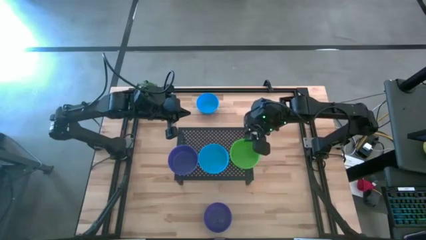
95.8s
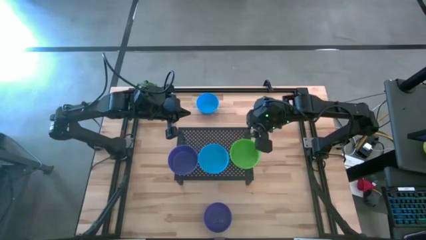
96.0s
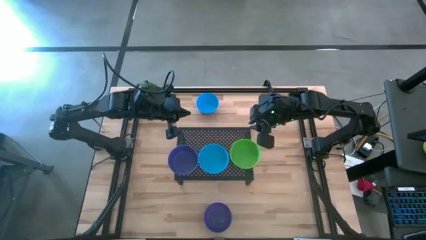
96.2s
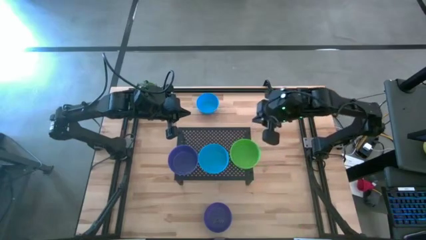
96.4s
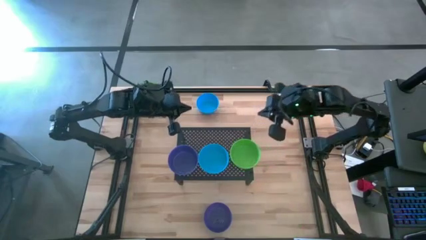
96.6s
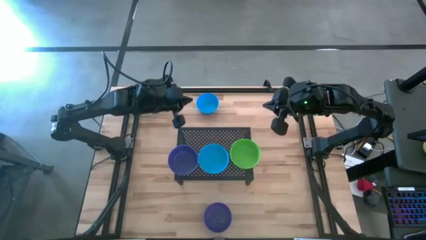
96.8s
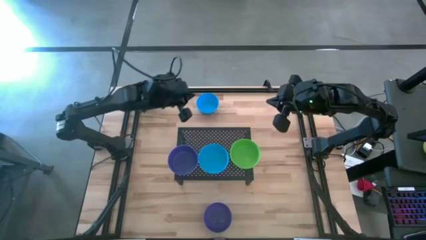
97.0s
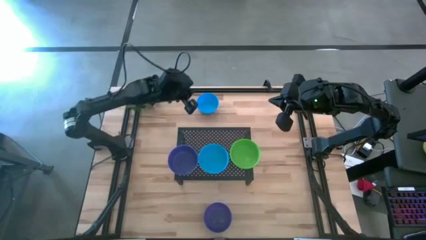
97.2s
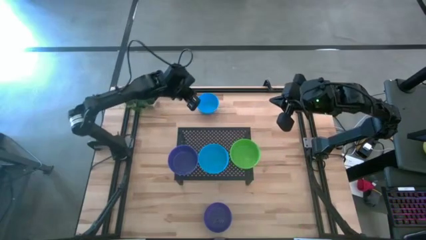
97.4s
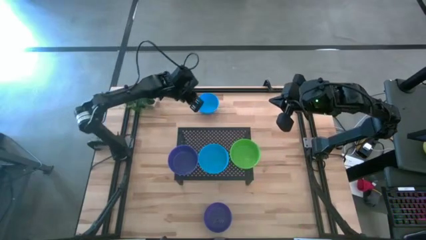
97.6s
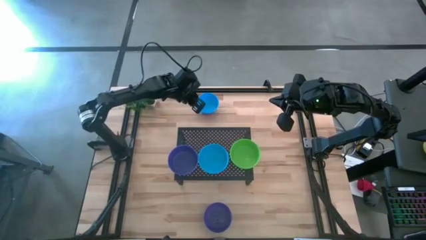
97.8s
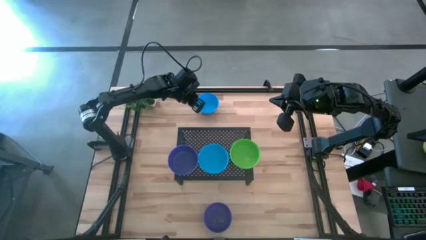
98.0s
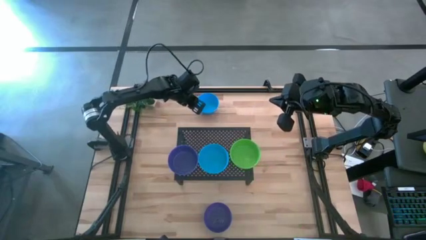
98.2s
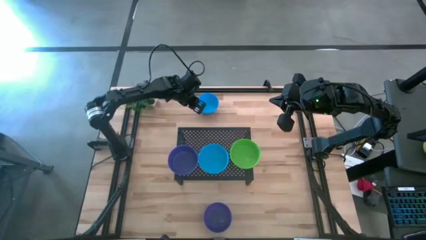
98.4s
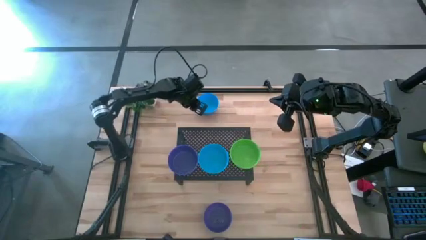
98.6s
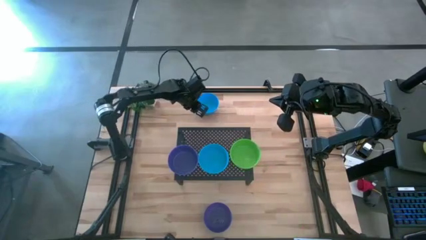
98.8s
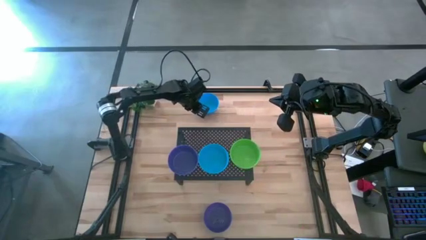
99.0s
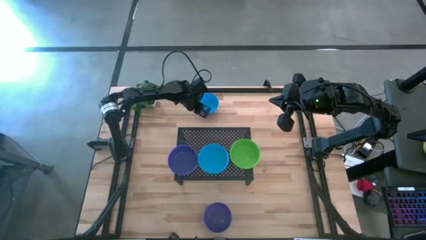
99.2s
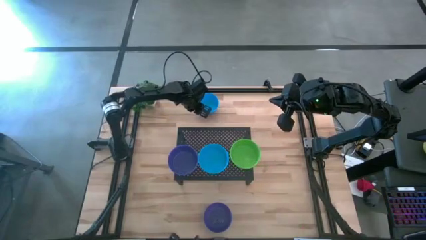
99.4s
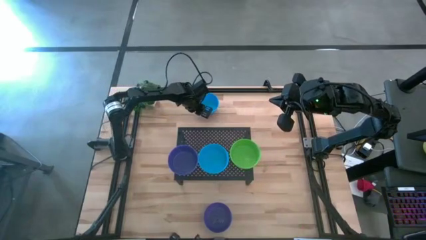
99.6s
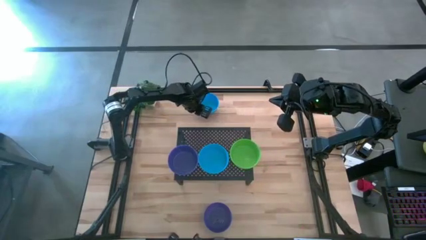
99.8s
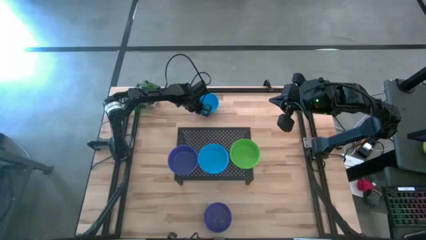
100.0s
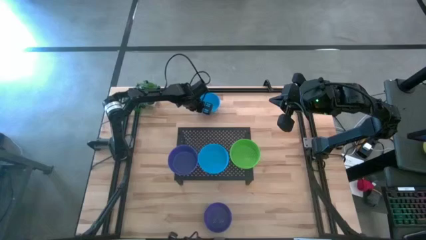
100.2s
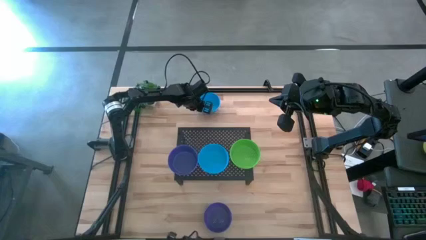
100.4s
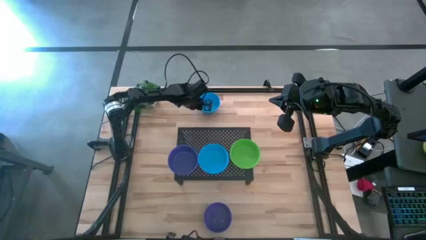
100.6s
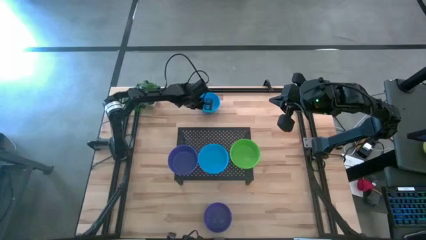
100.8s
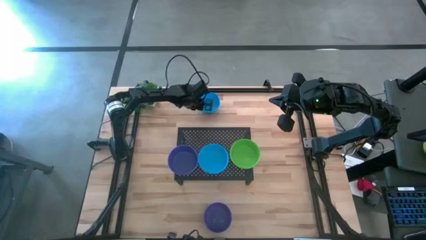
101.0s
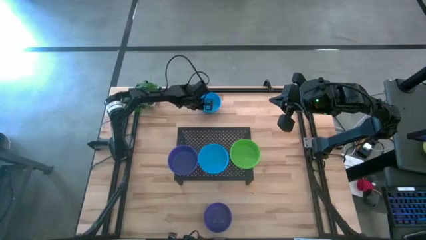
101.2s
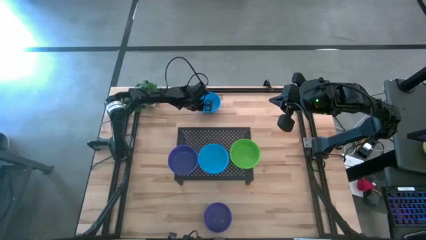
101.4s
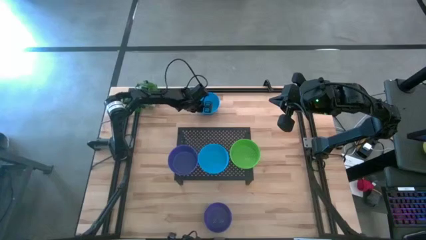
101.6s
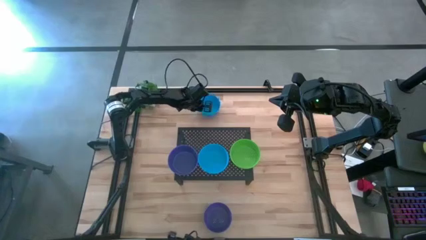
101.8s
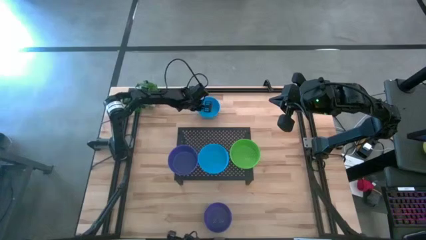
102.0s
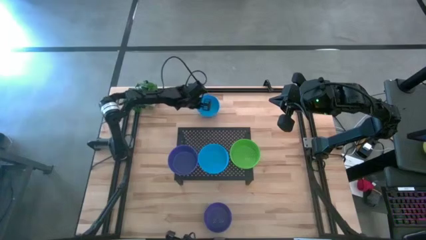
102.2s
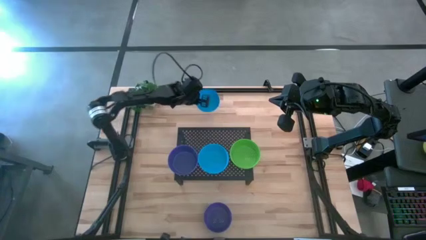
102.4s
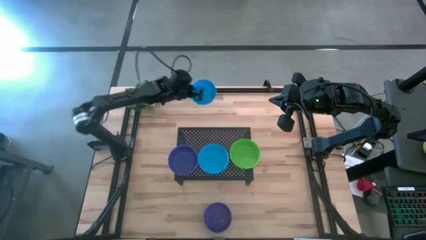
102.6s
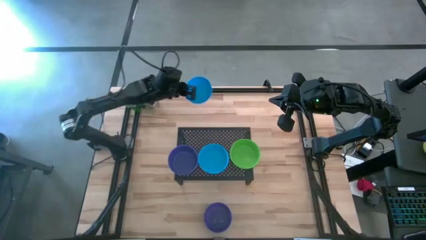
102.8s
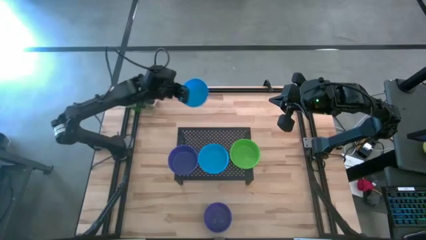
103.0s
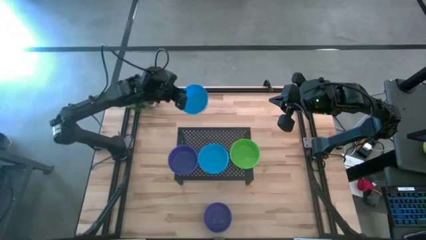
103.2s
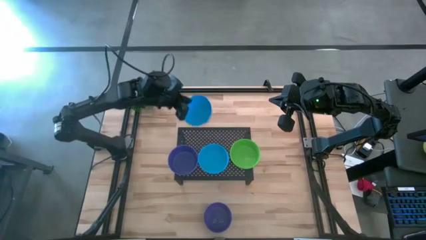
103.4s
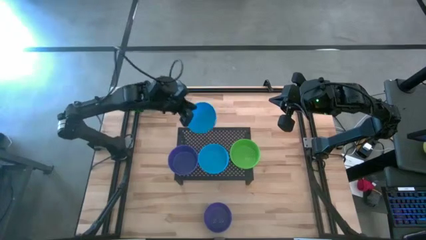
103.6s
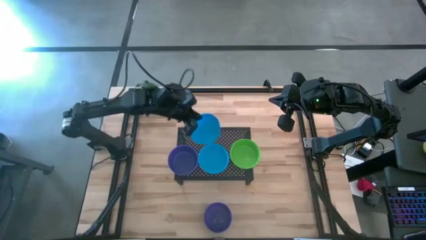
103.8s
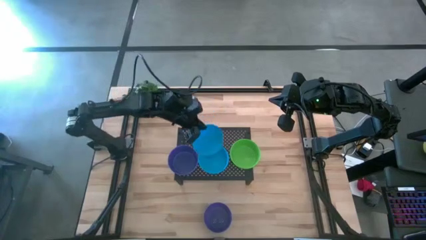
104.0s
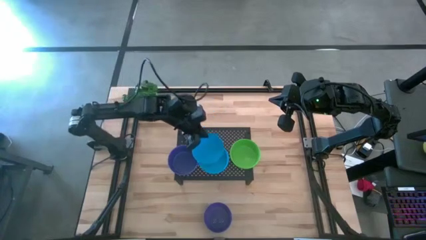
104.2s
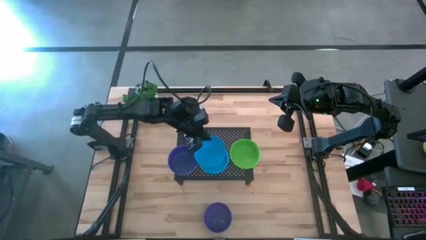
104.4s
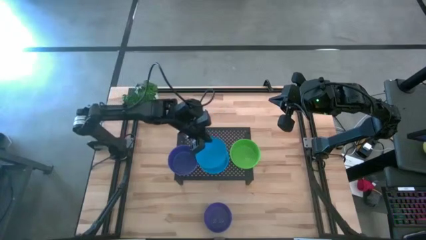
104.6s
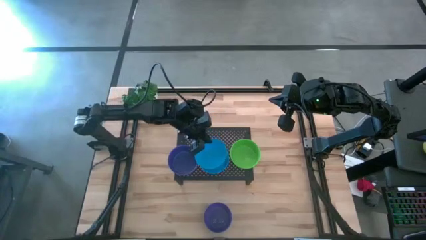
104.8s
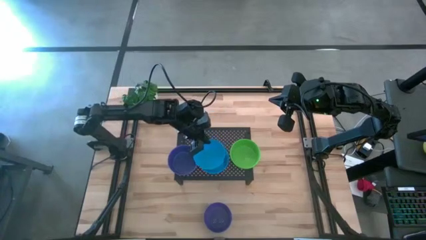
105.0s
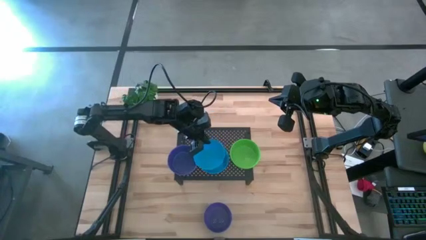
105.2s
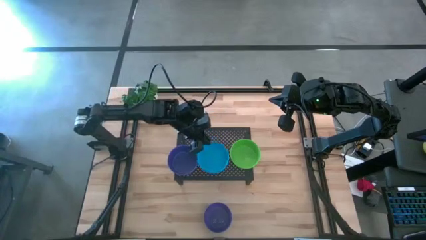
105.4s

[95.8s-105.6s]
Task: Pick & Place Mini bowls
Stack the light blue bowl on the blue bowl on the shelf

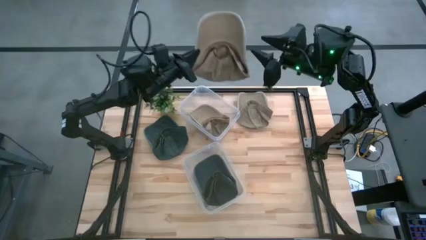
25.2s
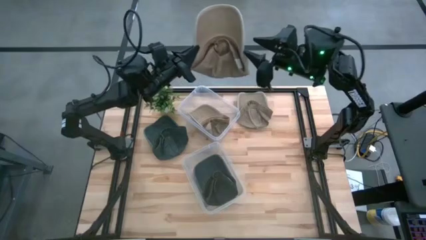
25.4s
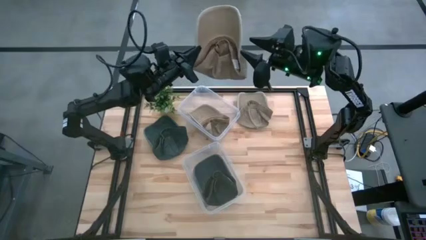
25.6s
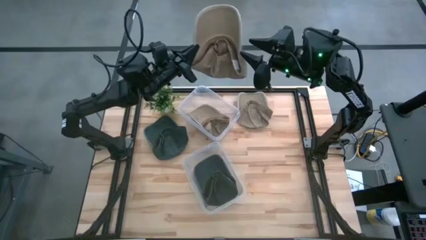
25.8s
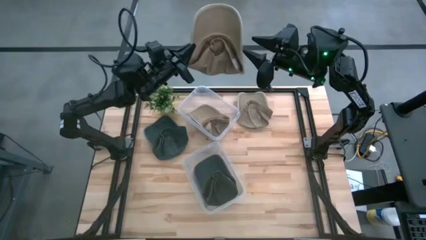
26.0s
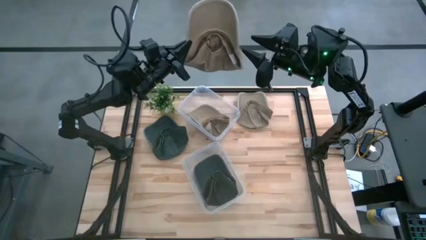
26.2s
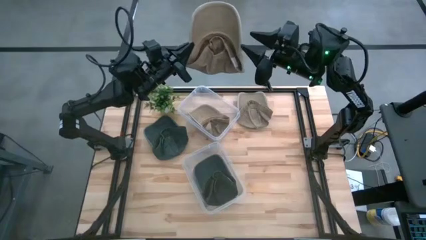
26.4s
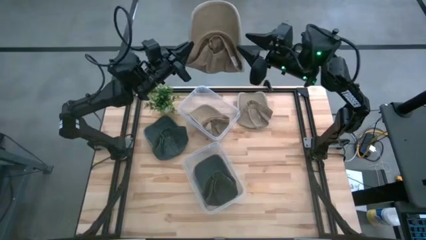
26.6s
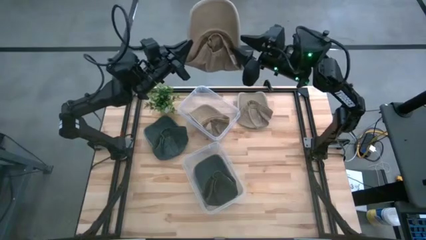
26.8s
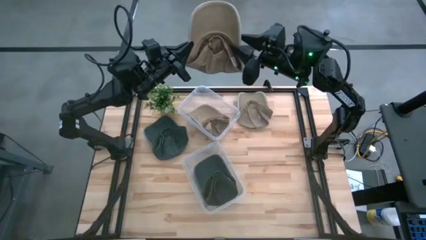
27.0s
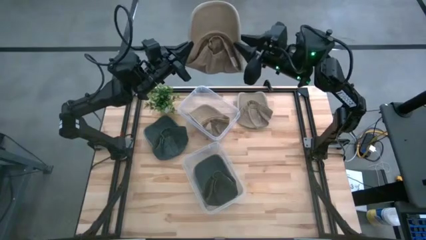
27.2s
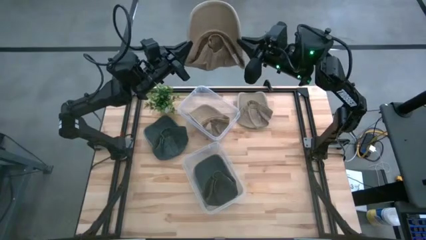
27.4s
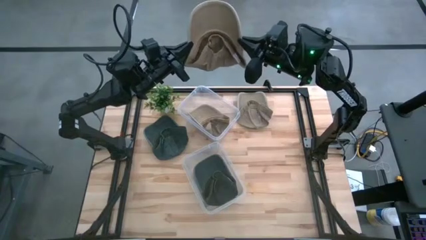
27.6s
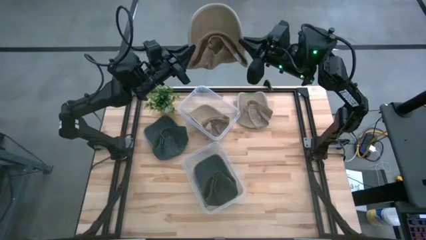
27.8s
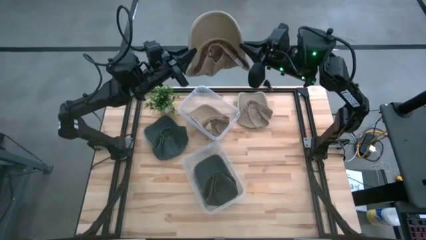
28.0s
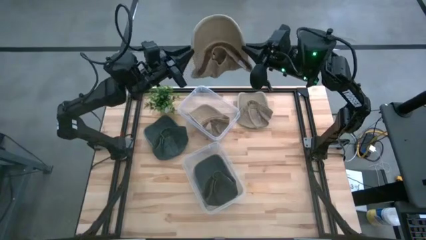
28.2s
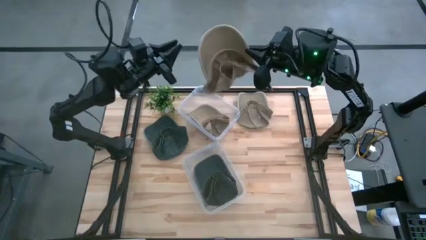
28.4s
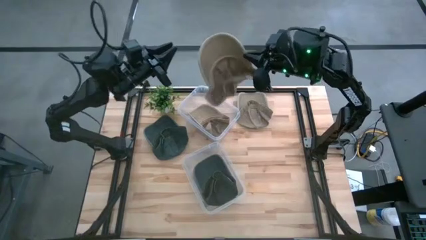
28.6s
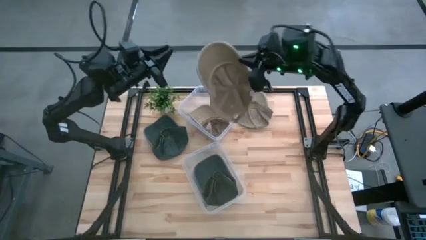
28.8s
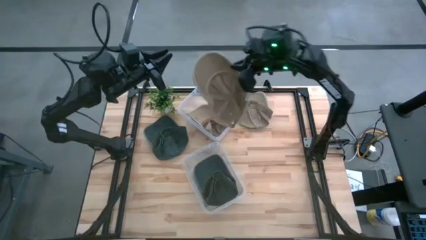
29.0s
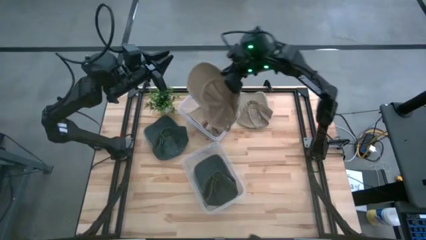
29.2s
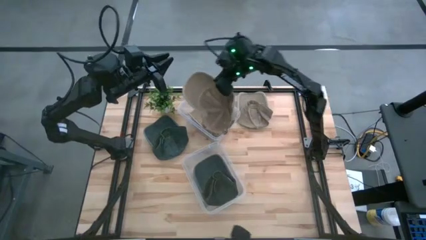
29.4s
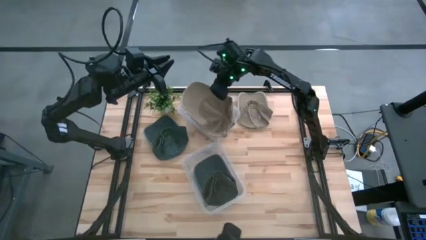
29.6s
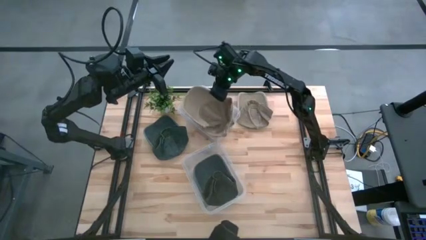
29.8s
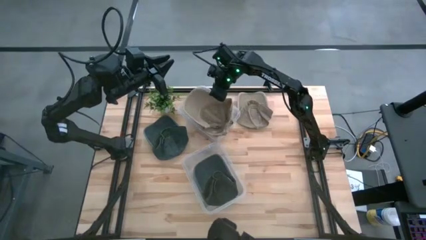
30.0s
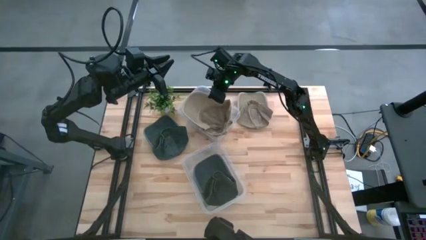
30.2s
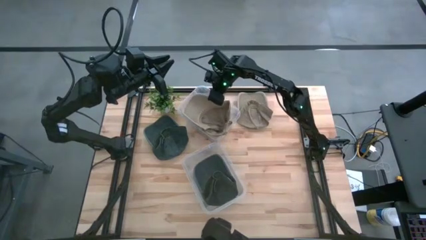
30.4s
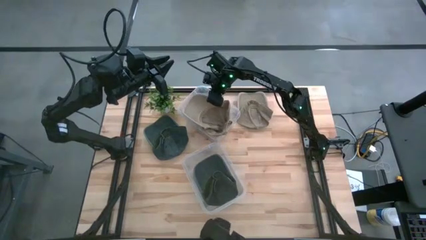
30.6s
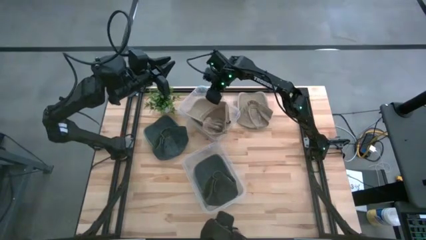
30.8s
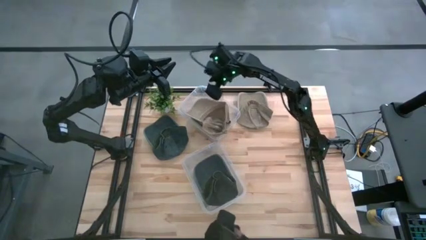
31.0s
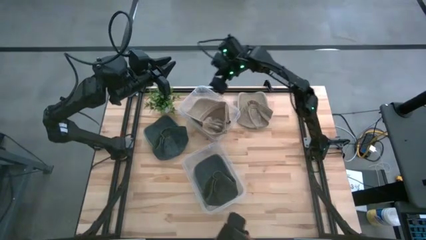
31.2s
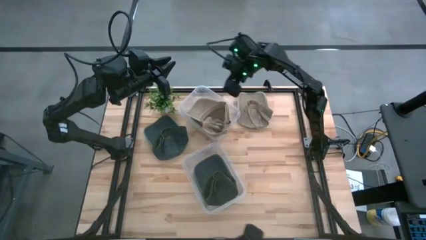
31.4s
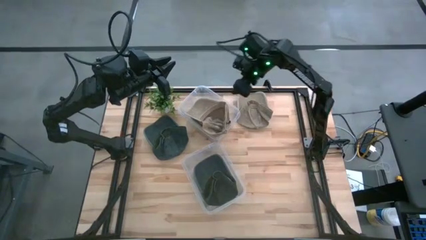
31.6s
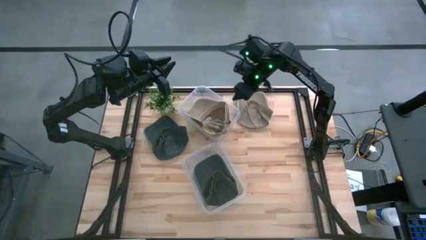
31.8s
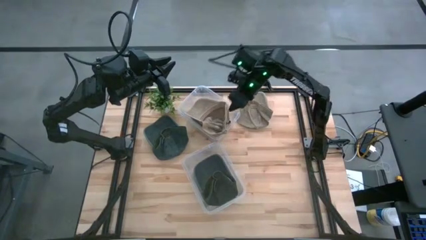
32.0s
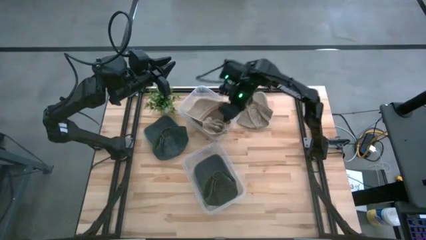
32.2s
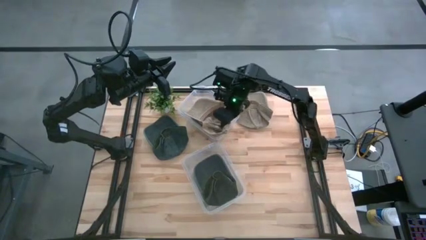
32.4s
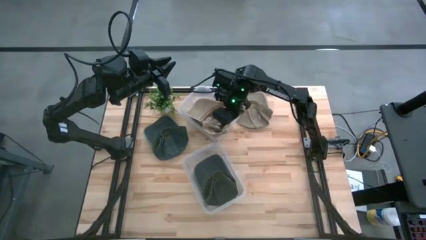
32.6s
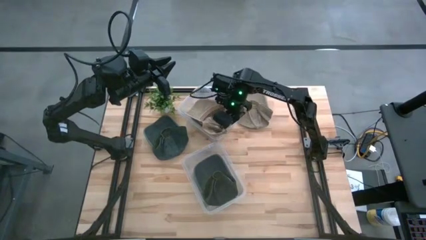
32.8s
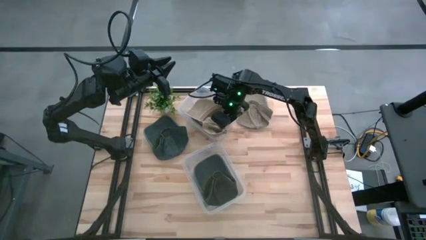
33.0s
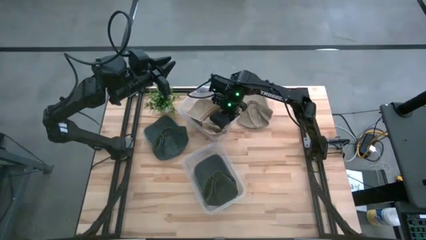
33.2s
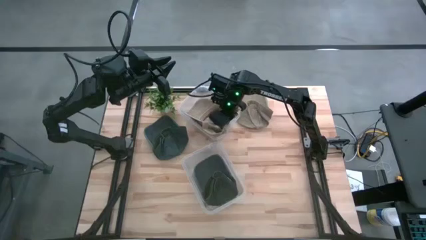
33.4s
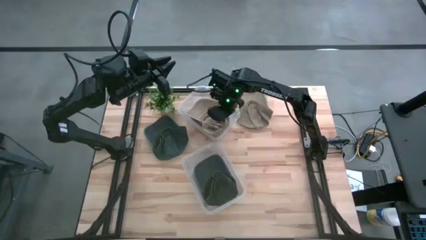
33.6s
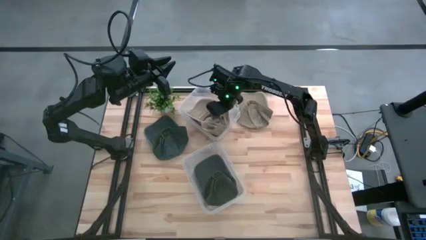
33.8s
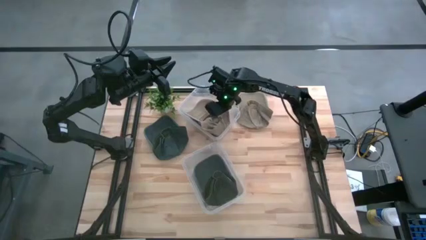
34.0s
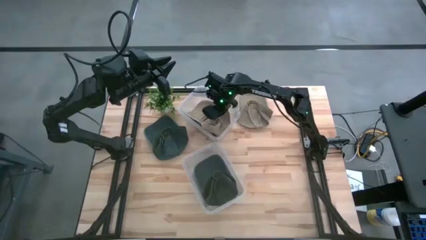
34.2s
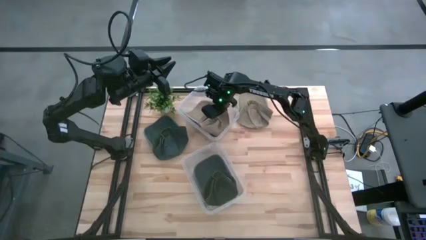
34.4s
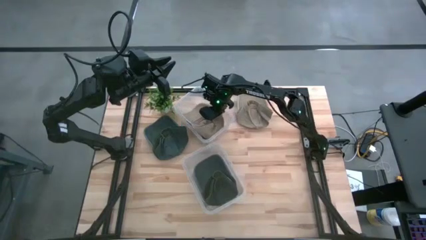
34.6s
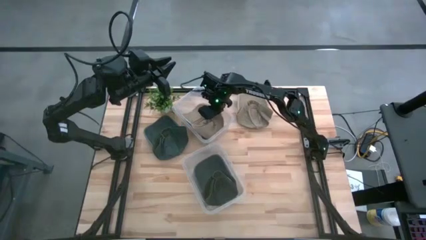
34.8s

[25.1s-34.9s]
Task: Pick & Place hat
Put the bottom brown cap into the top transparent bin
